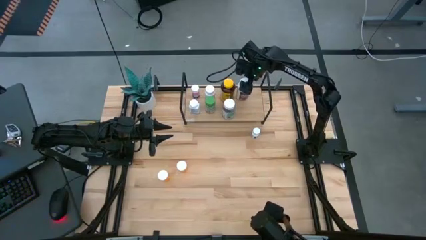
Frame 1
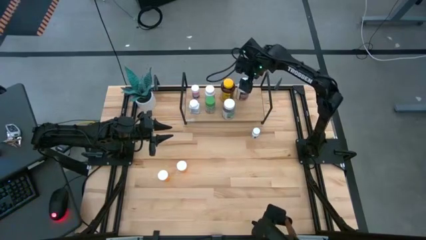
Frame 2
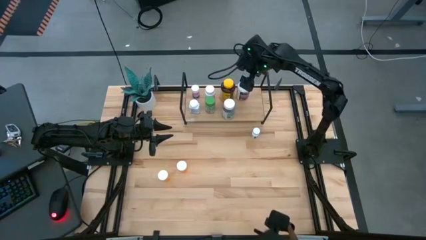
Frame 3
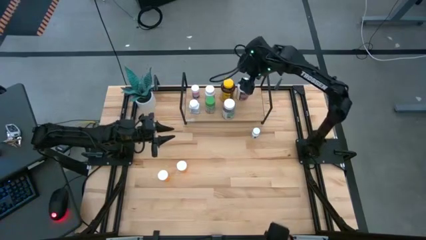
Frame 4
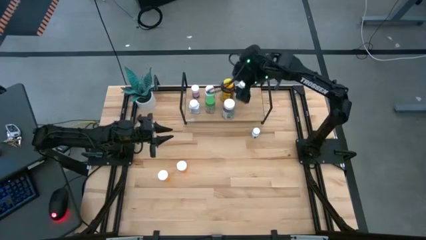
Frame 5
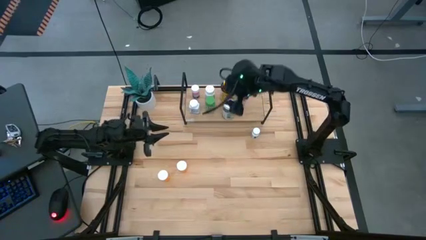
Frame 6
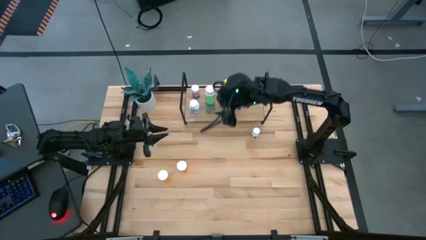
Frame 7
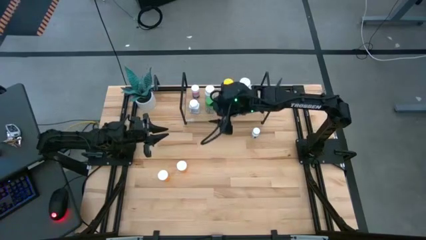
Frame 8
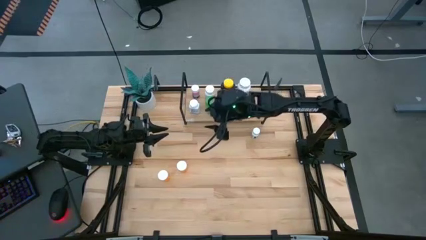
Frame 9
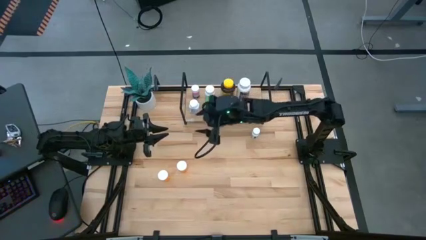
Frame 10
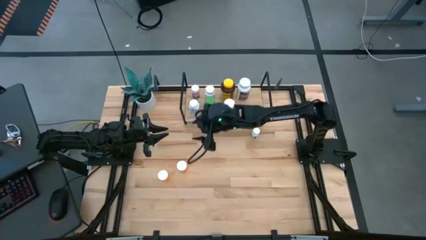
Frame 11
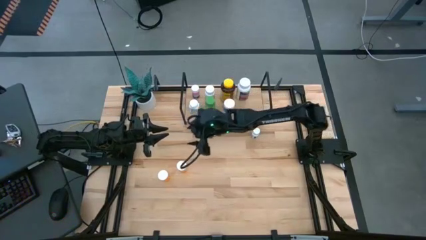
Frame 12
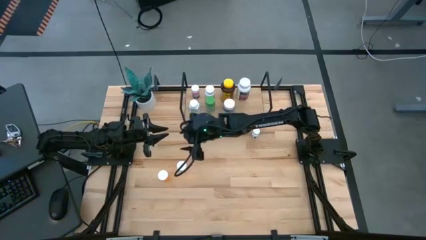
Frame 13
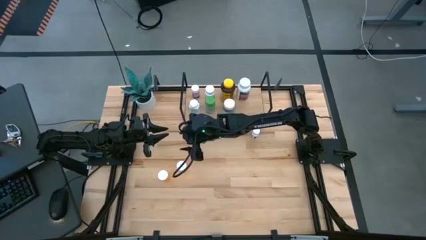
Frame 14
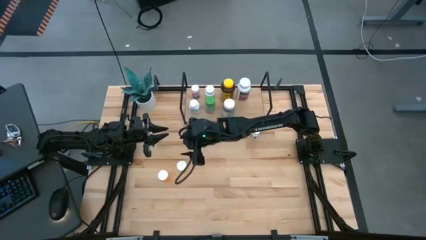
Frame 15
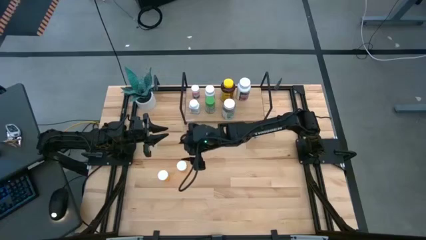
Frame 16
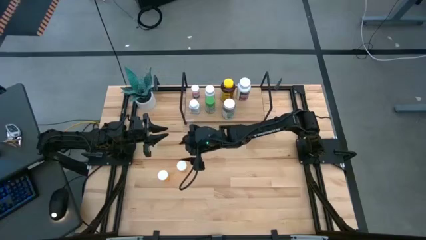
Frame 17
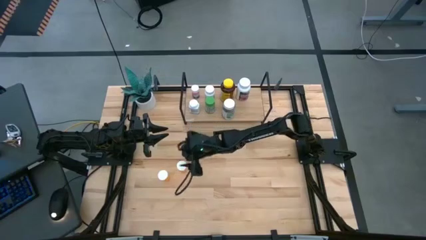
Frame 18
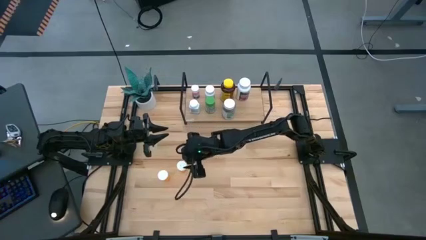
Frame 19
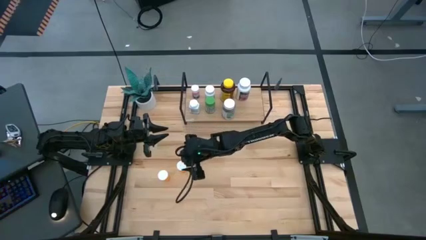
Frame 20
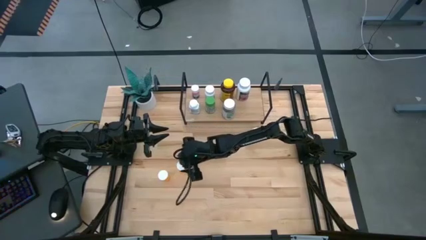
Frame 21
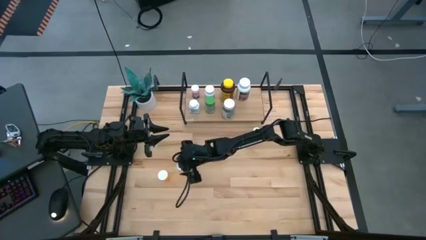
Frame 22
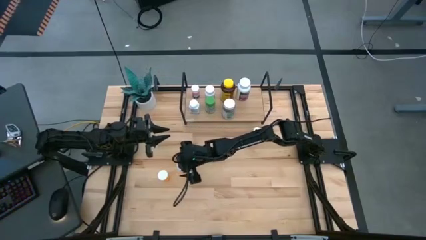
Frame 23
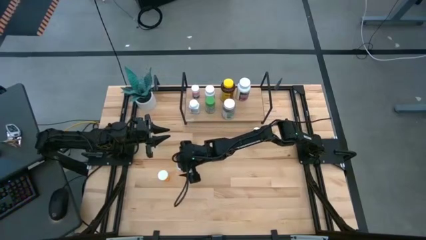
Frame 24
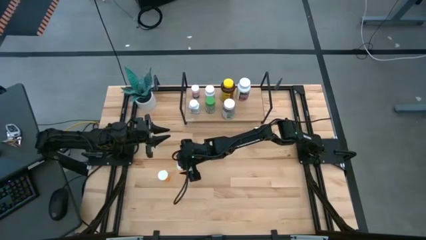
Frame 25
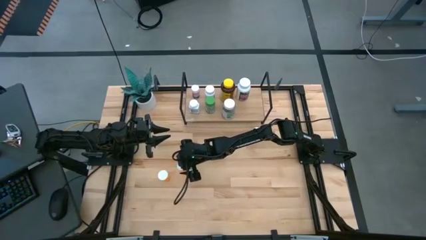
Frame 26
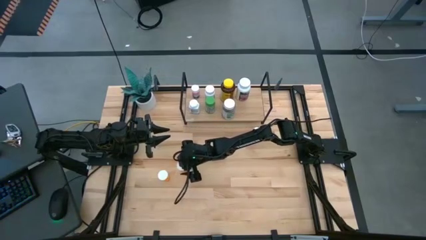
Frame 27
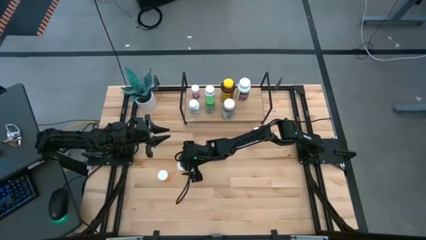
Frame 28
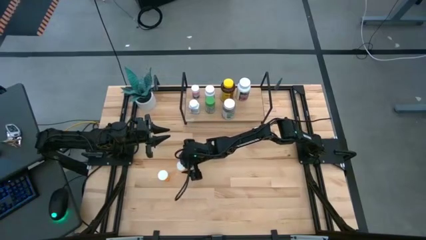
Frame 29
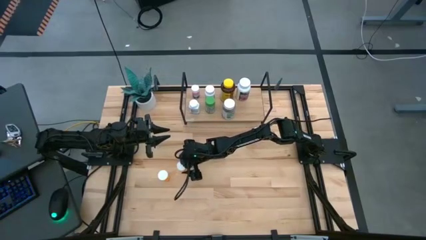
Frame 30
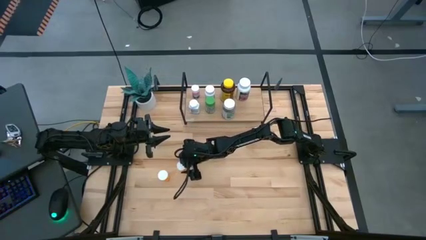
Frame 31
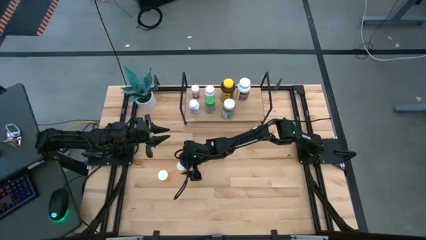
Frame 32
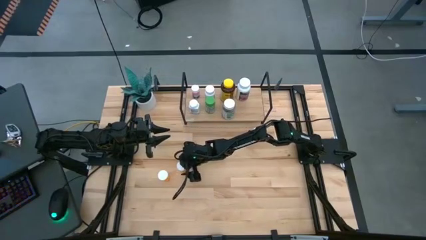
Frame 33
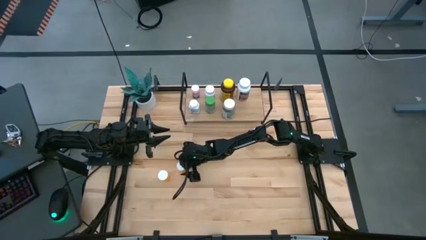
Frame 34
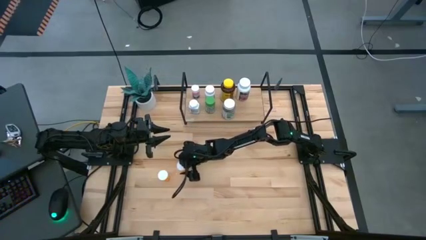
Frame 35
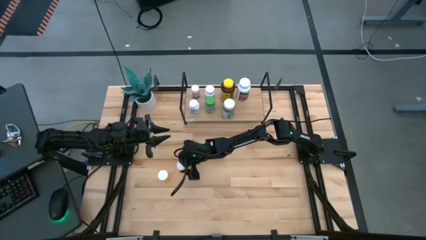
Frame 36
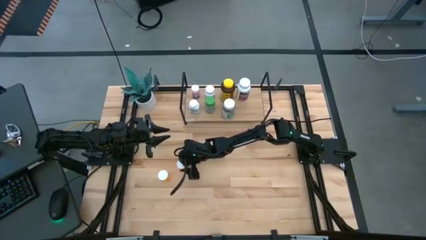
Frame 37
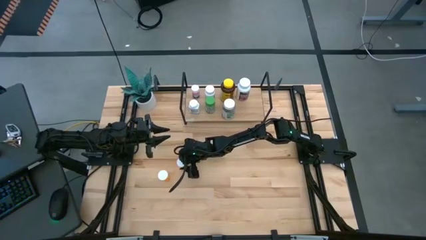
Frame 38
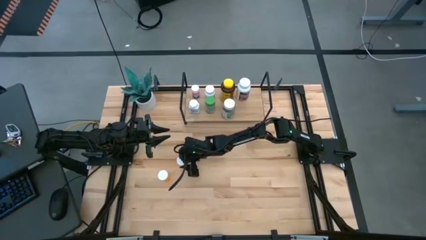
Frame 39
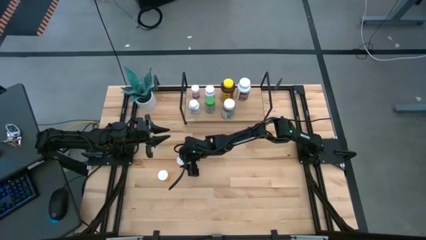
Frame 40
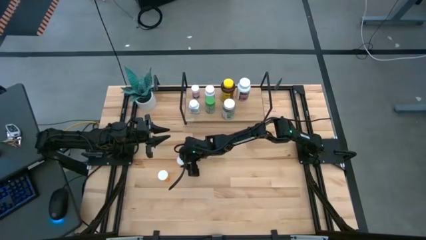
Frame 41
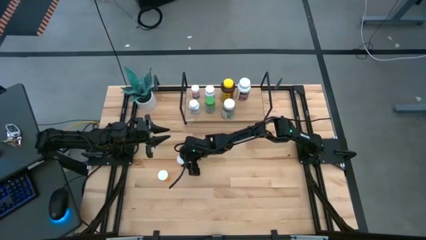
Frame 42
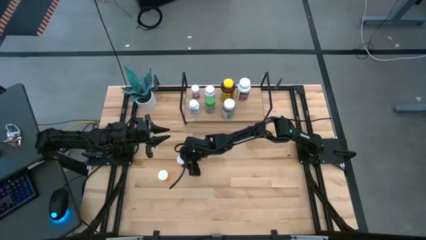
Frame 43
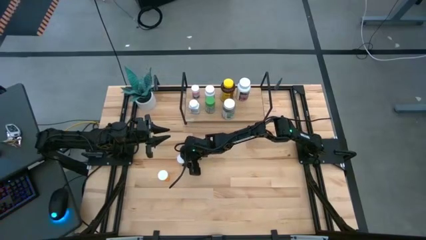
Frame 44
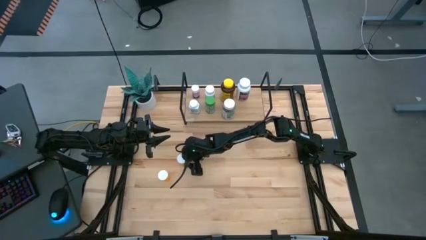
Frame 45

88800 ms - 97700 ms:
Task: Pick and place medicine bottles onto shelf by color
Adjust the right orange pill bottle

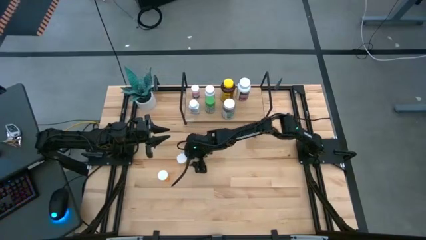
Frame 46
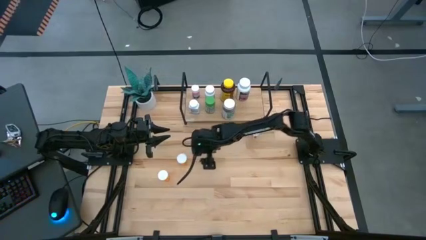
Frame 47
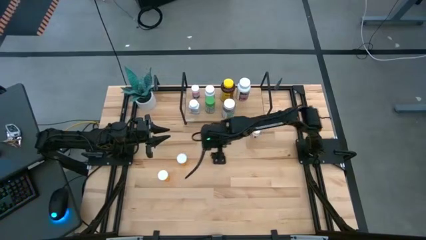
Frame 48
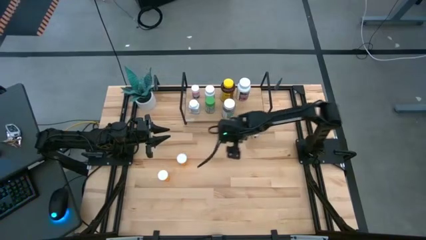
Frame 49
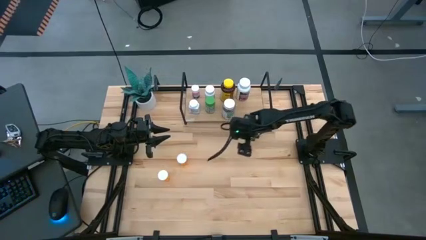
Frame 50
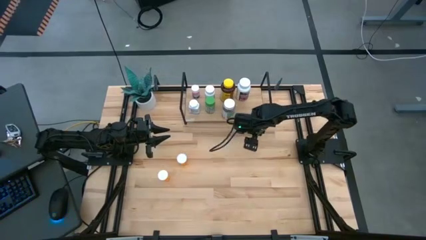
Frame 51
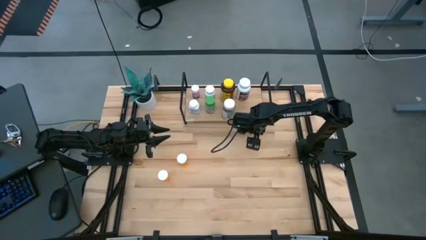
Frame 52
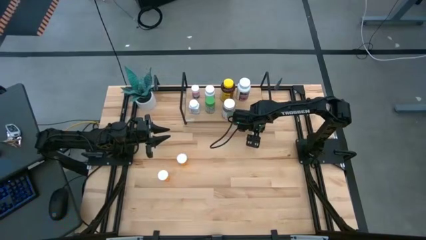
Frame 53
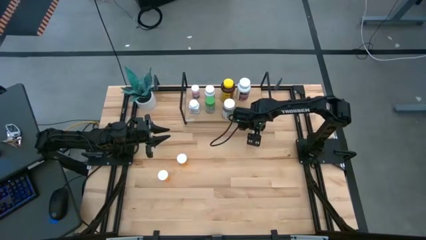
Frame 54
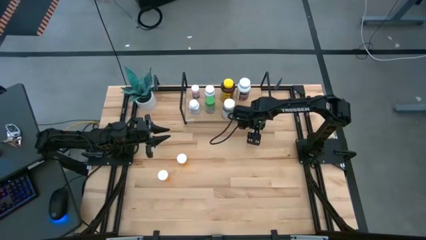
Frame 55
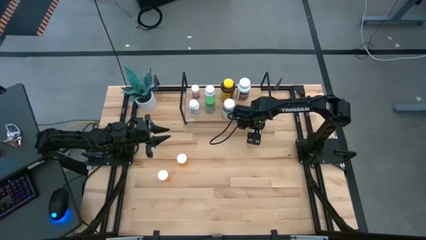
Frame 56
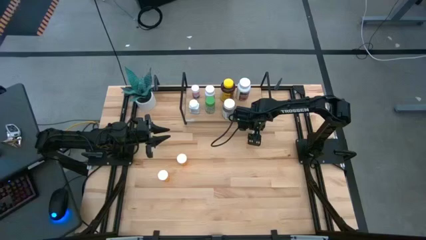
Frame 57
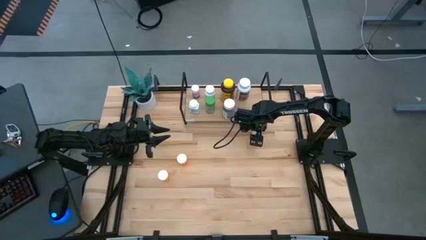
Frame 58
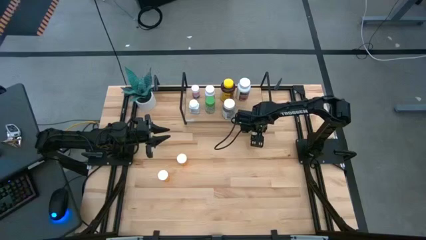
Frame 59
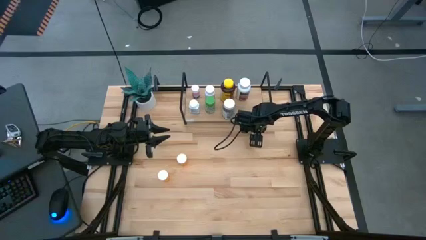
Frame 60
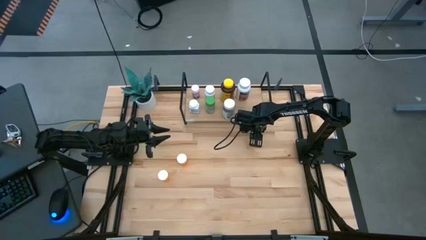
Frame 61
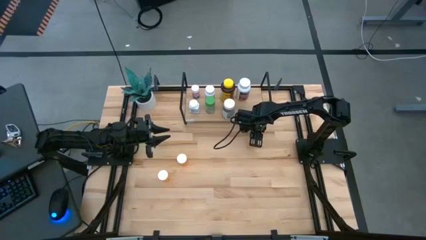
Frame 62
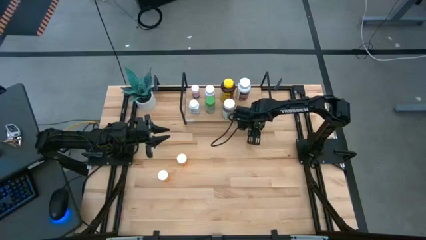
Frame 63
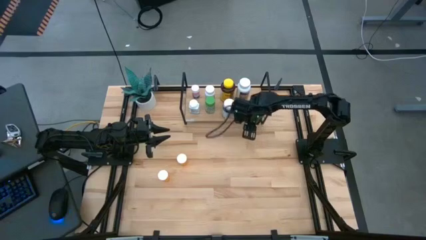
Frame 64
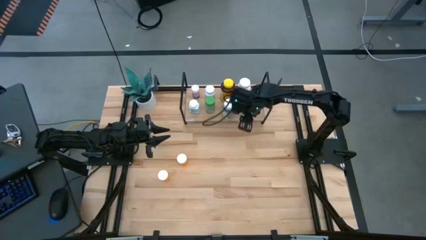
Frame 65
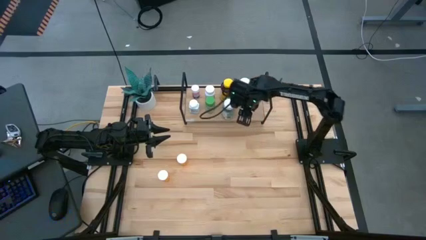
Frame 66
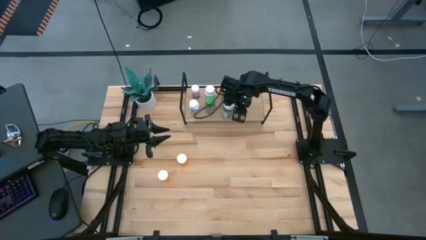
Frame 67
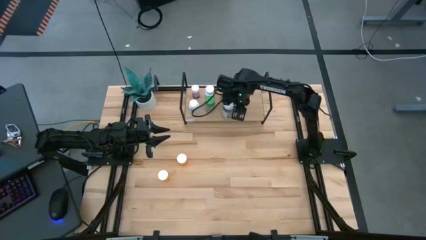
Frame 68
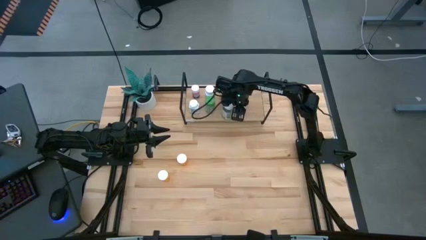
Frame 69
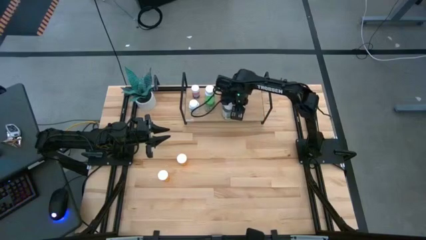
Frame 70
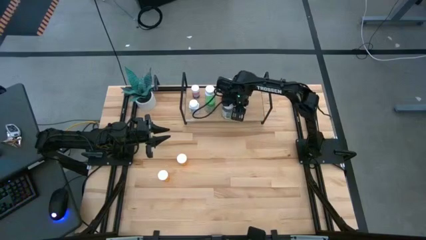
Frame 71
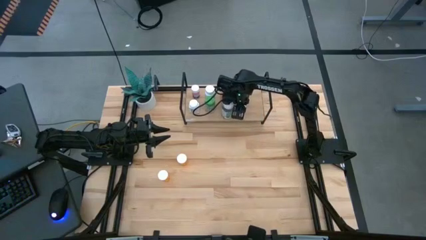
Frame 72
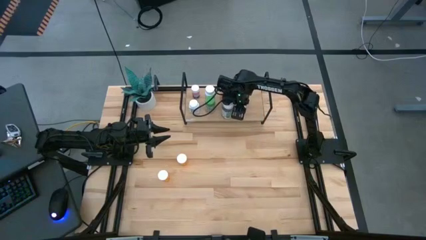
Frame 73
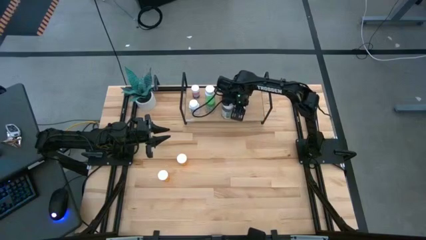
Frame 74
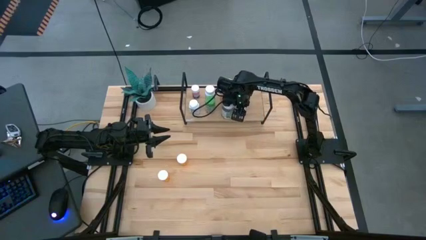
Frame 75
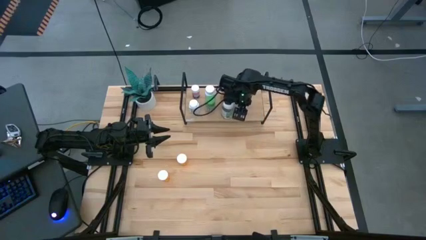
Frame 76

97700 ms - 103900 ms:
Put the small white pill bottle on the shelf
